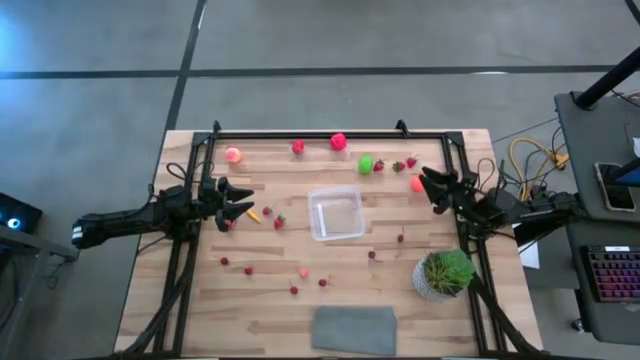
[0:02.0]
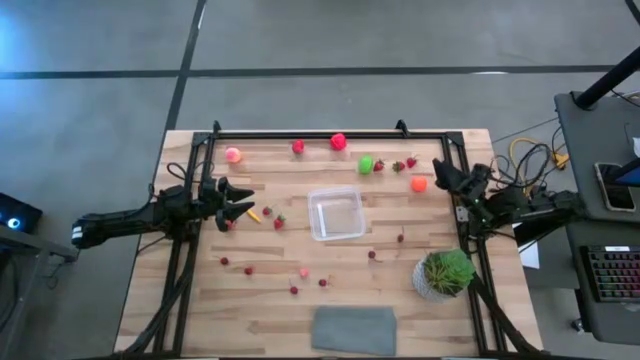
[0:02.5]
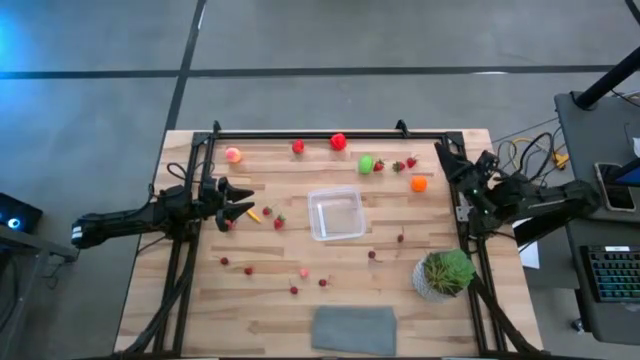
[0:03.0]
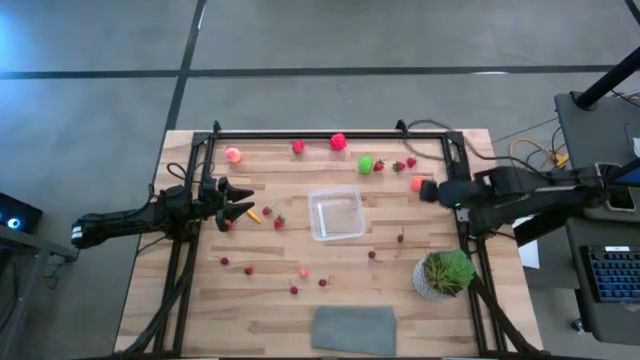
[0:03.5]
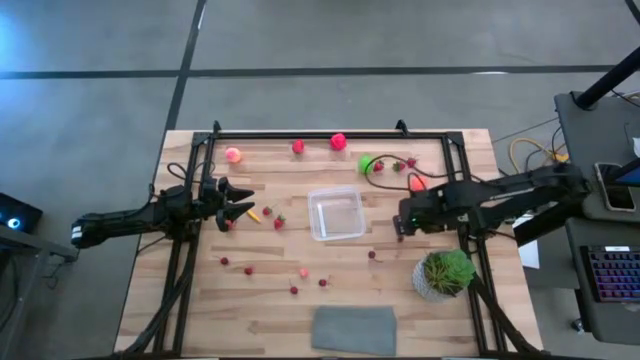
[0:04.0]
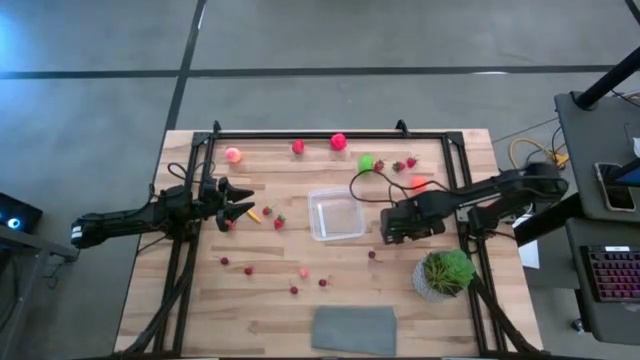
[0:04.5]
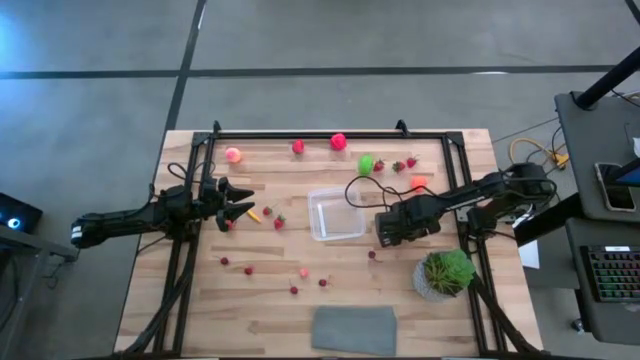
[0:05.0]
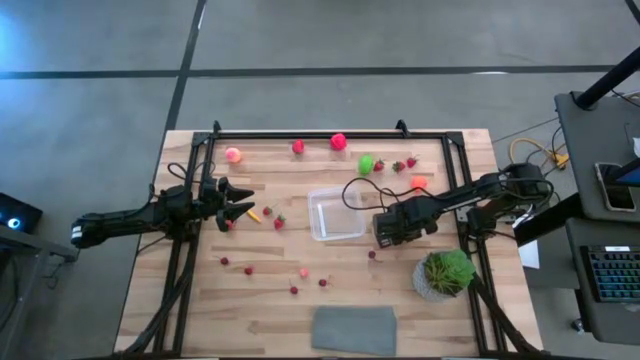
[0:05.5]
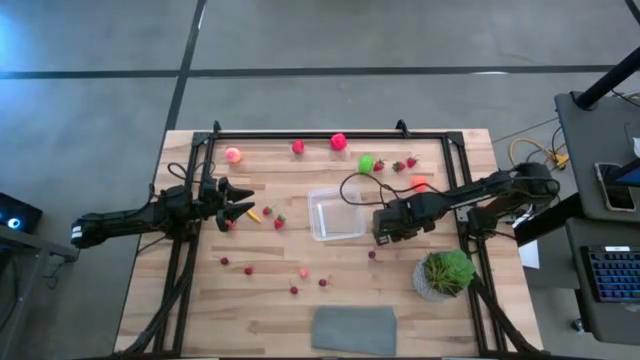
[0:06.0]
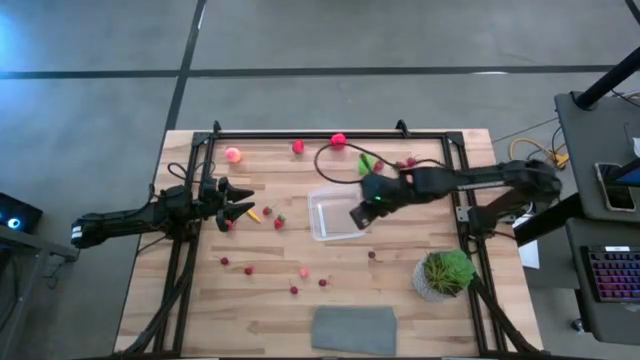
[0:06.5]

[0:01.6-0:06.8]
Task: Pick and placing Produce into tupperware
Put the red cherry into the transparent container

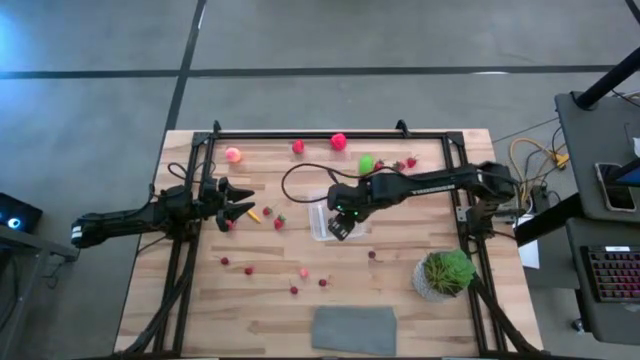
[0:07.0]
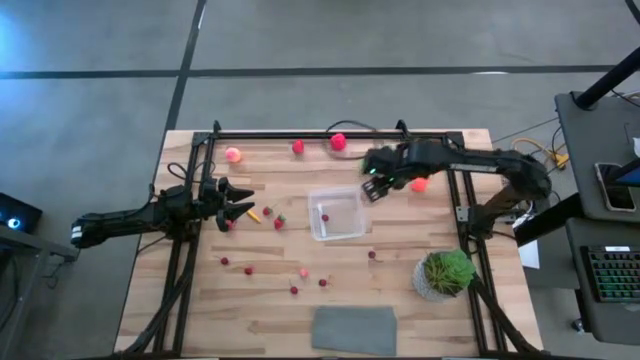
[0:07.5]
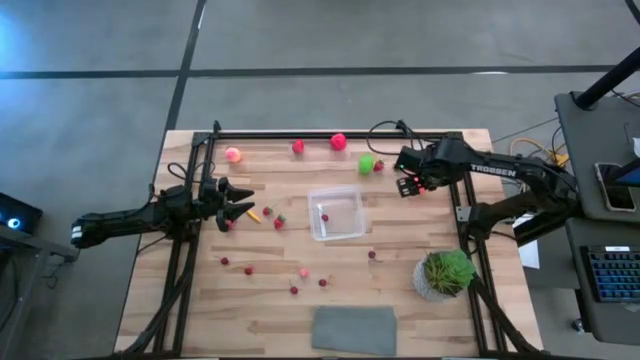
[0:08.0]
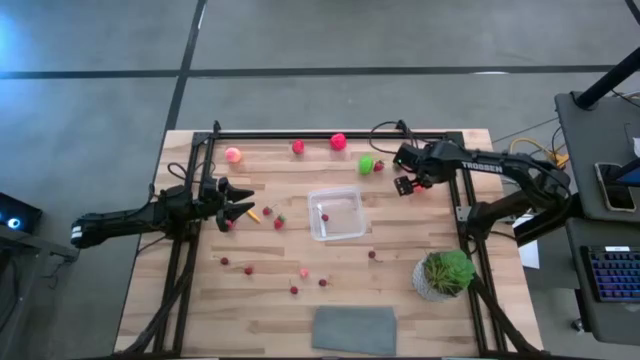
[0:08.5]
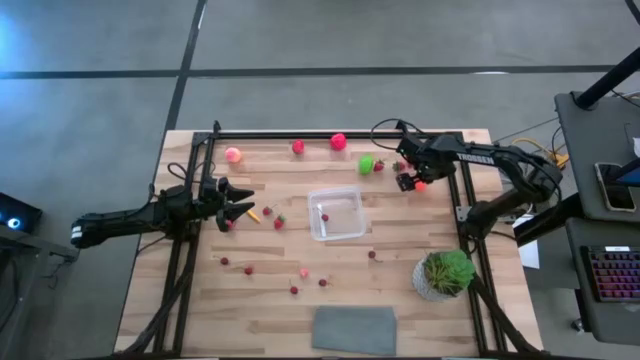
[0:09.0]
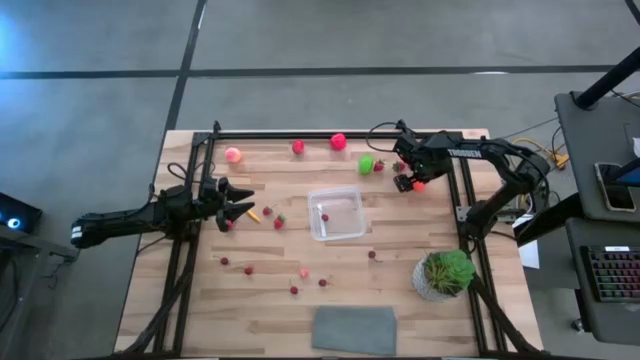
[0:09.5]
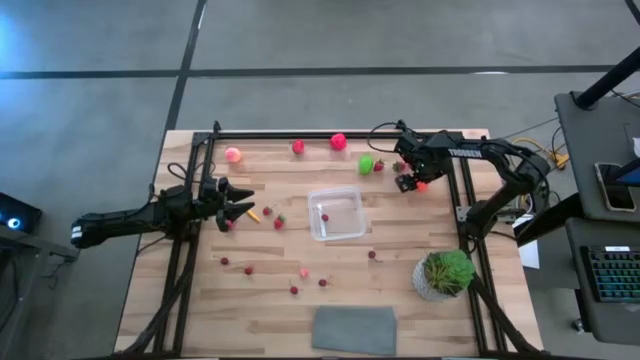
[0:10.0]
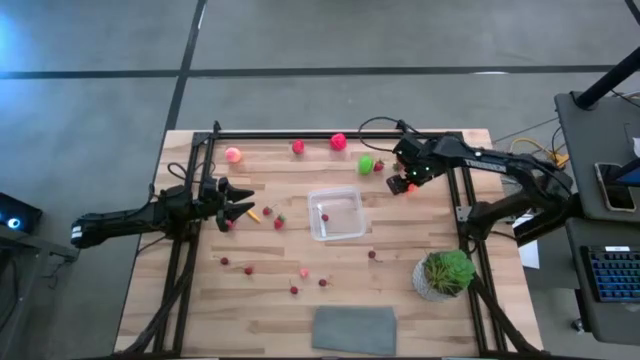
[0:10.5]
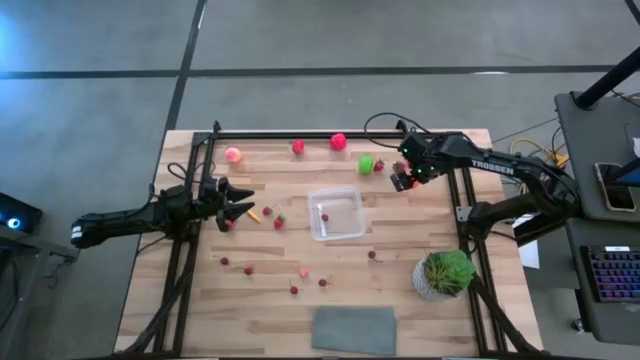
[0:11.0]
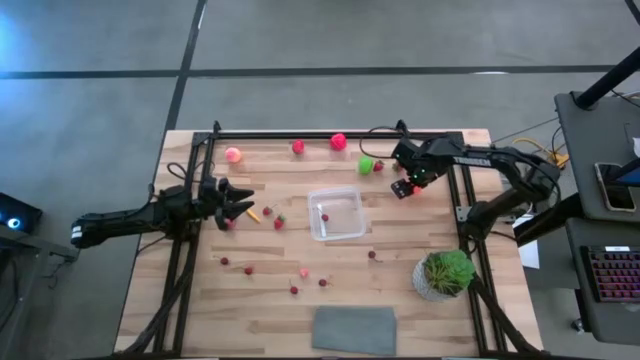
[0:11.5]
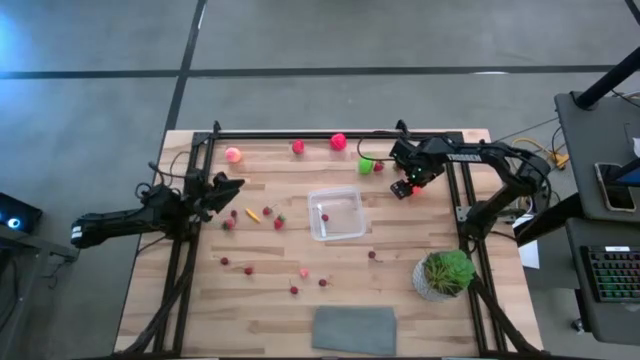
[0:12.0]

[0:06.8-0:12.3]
Adjust the orange pumpkin

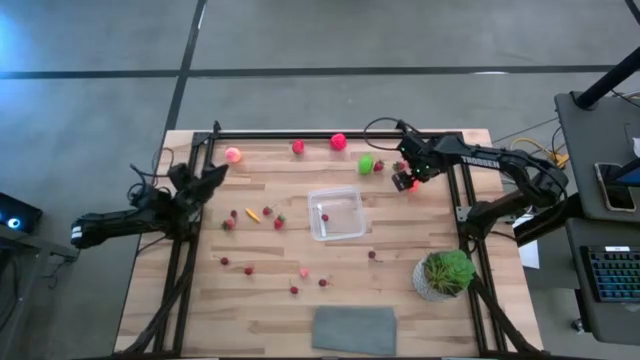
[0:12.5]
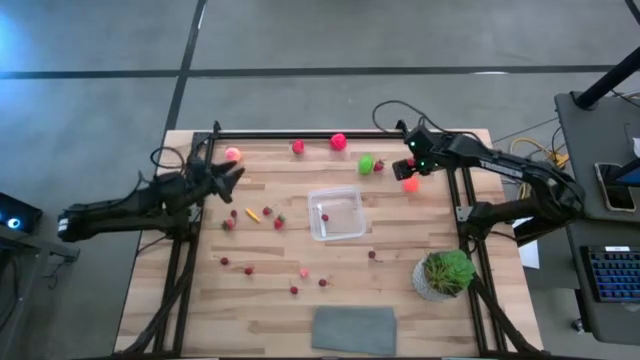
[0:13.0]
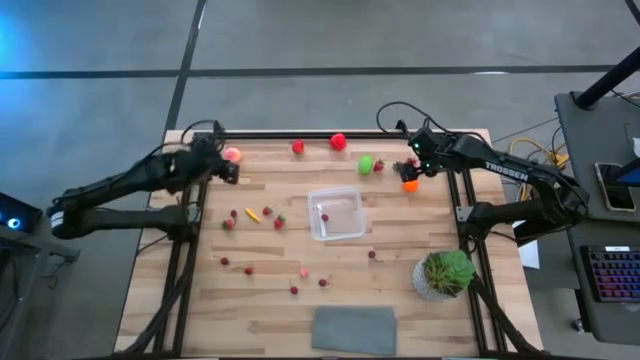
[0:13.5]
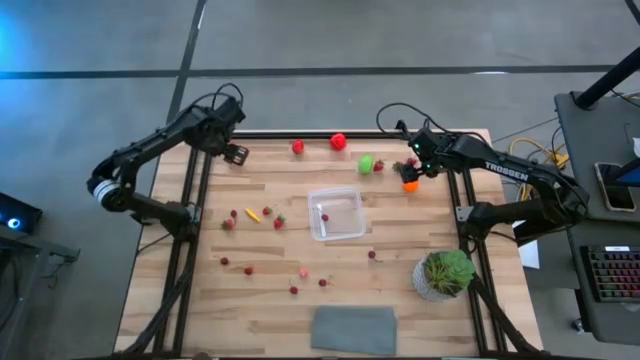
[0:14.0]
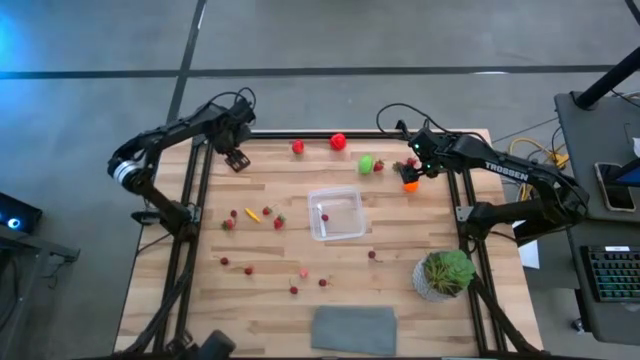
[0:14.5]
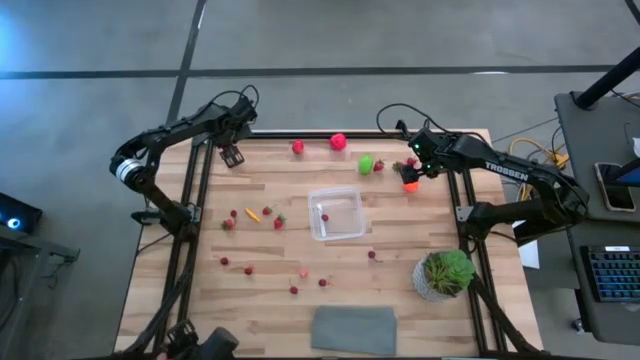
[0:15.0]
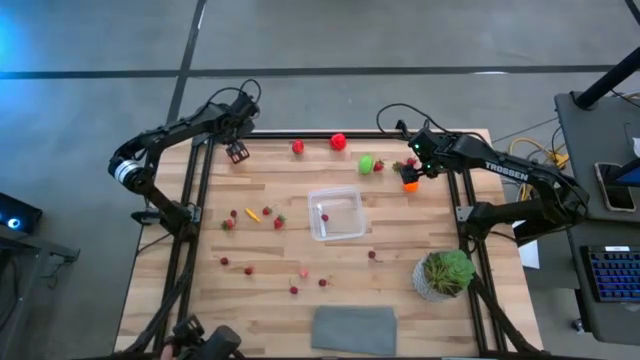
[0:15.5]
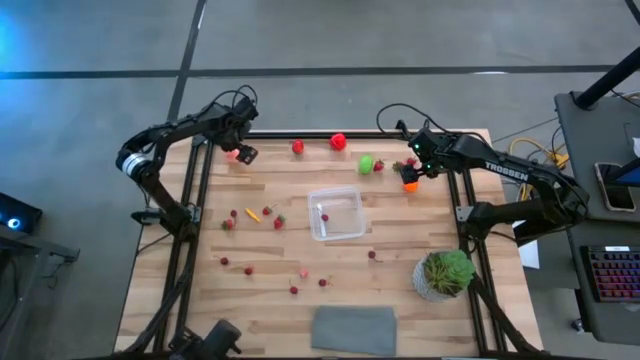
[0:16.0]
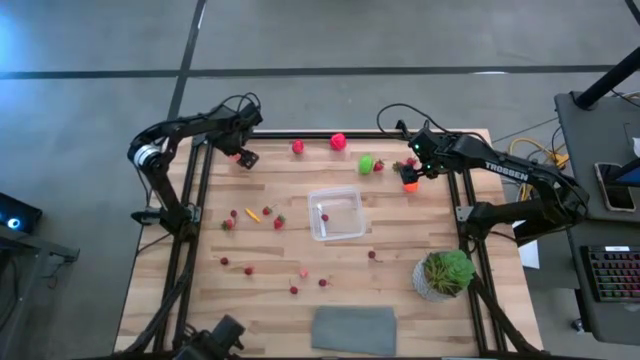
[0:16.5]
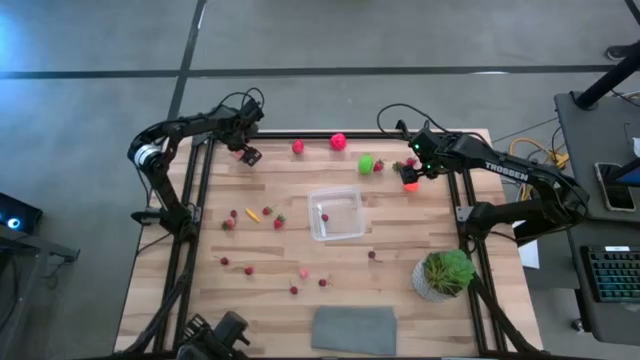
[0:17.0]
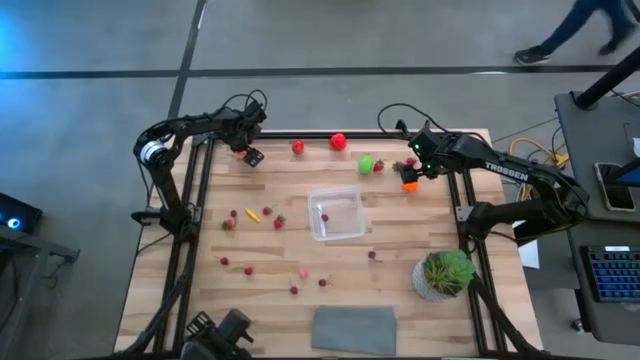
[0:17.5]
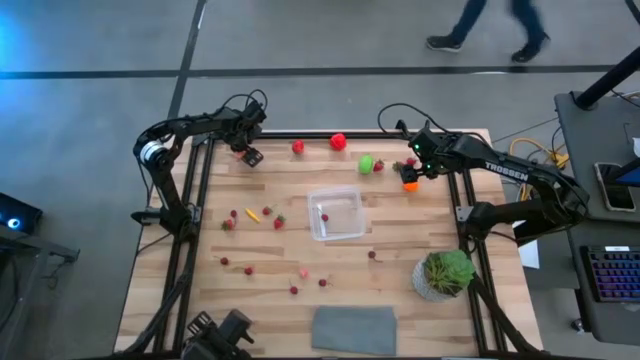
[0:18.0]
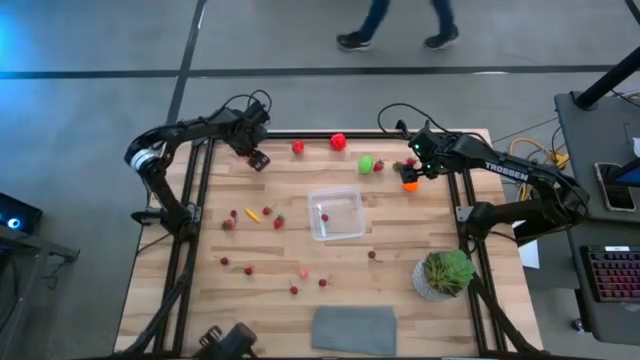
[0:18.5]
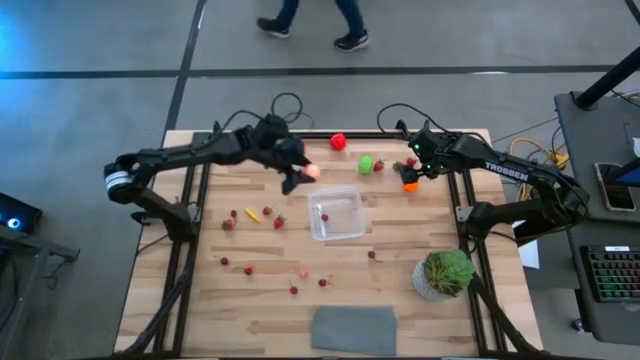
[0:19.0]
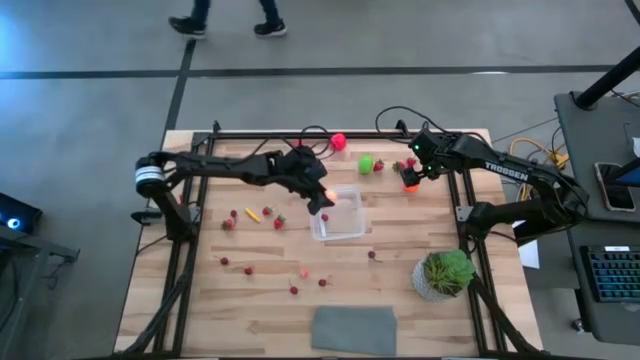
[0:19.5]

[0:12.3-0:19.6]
Put the yellow peach into the transparent container

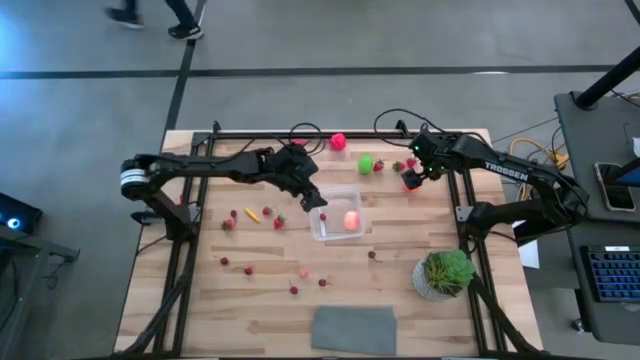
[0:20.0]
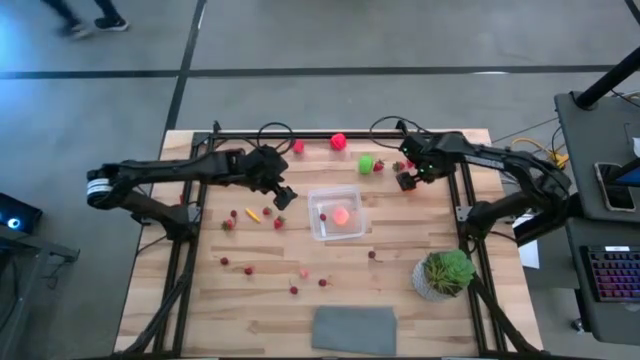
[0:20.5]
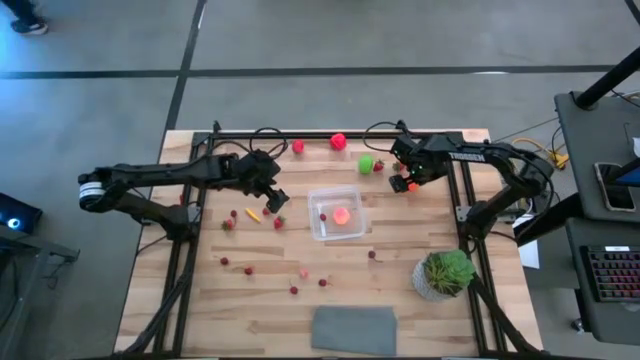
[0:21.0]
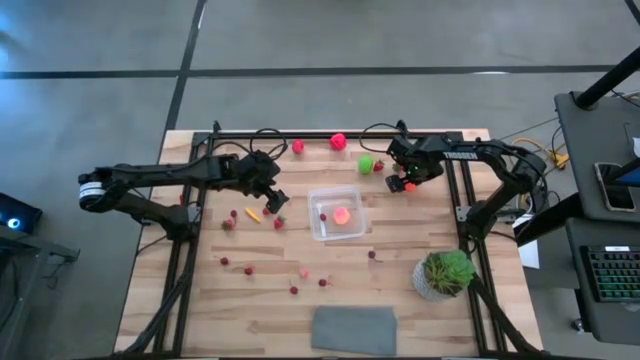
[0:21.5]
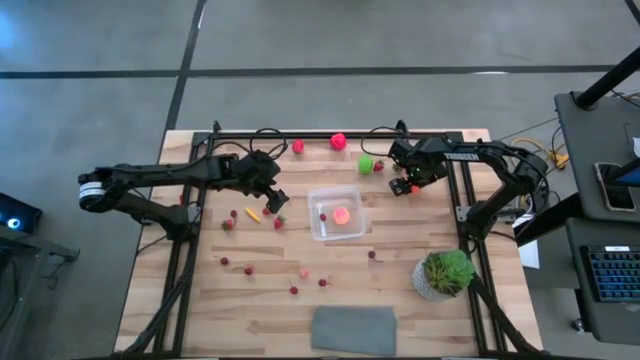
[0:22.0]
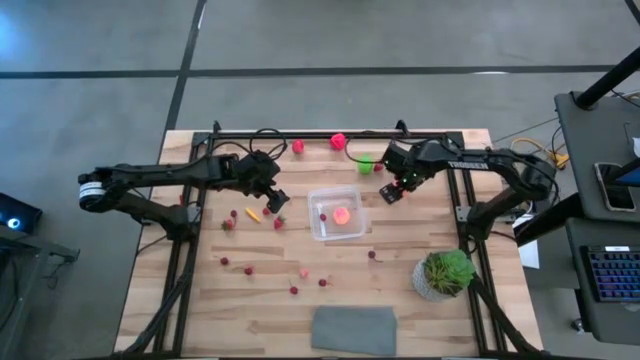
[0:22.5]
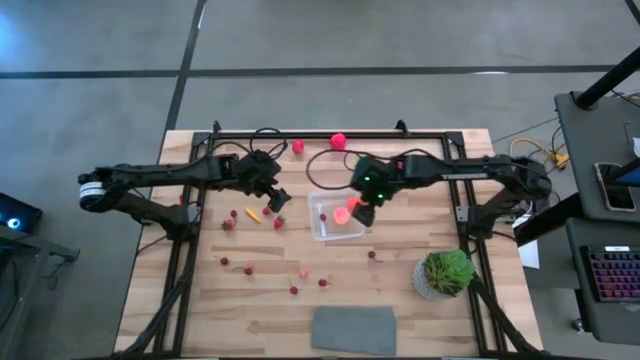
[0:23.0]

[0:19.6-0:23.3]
Put the orange pumpkin into the transparent container
